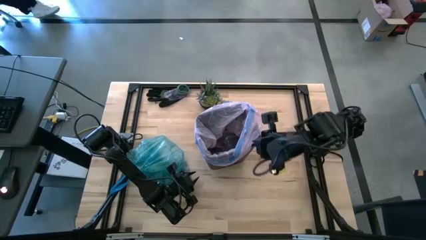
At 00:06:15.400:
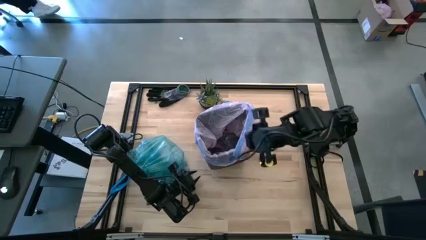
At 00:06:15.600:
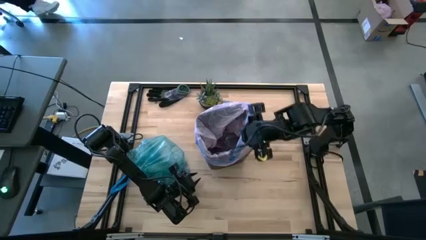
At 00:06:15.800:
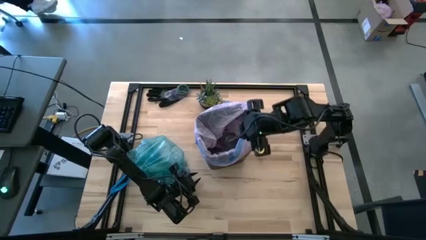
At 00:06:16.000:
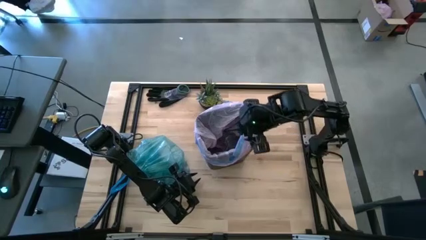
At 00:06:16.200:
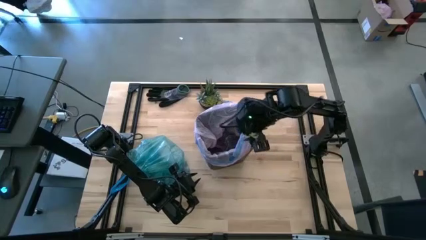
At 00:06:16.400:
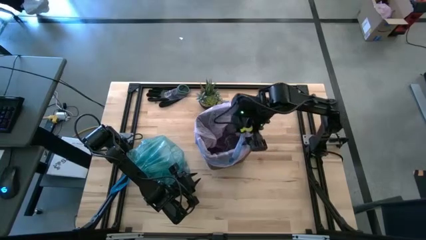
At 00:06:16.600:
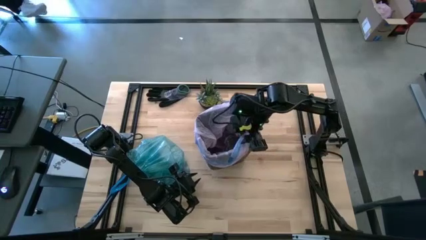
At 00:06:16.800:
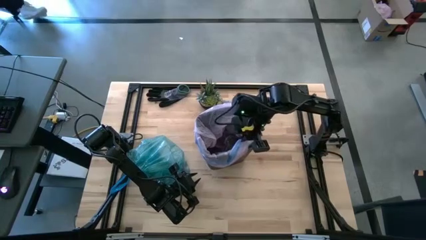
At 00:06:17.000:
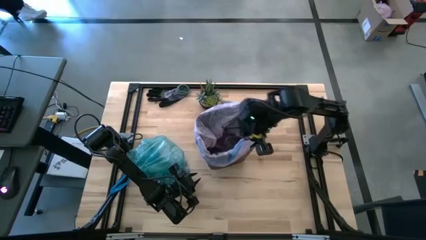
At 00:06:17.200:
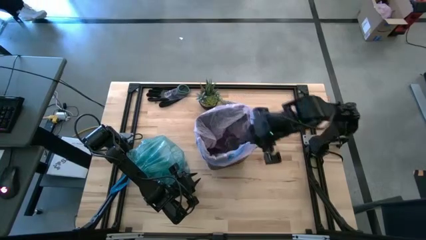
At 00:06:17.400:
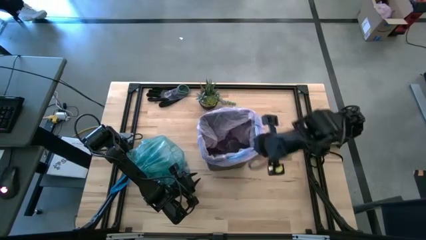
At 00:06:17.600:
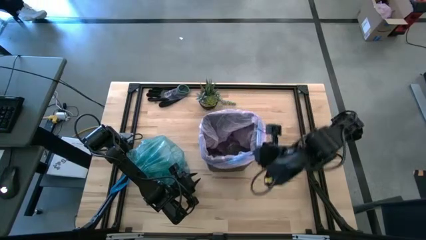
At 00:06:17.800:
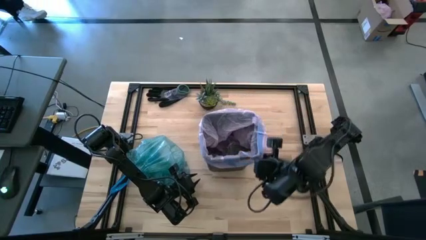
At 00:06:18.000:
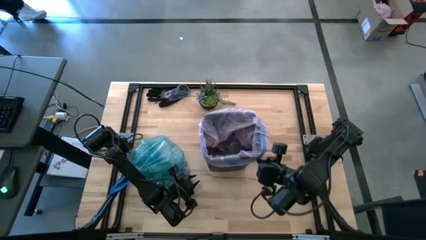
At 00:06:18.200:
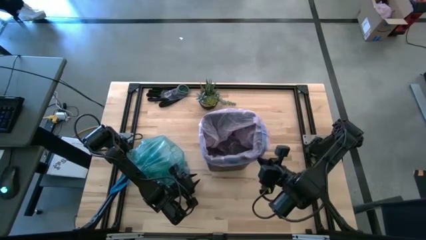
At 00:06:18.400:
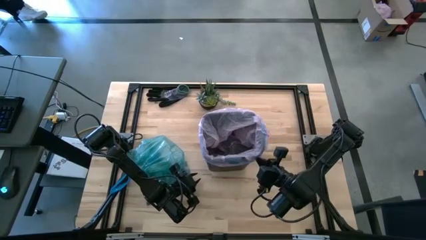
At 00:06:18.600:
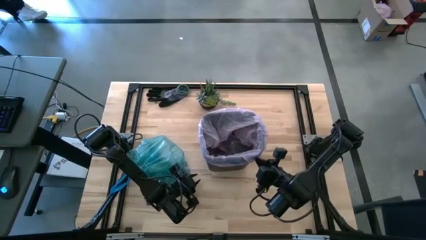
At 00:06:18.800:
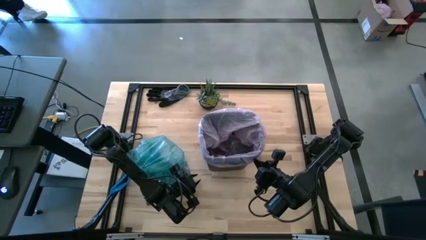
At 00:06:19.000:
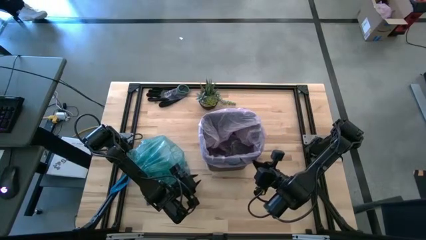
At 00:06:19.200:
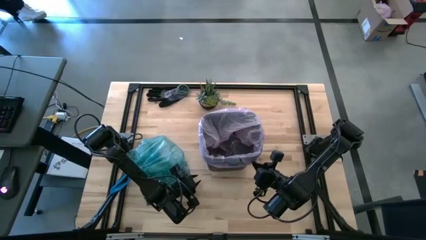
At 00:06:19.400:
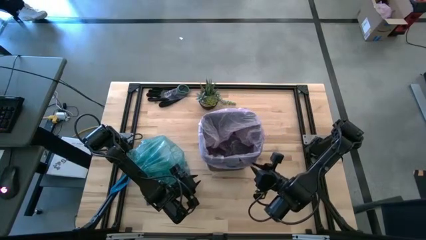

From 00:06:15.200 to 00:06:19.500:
Task: place trash/remove bag and relplace
Put the pink trash bag into the trash bin

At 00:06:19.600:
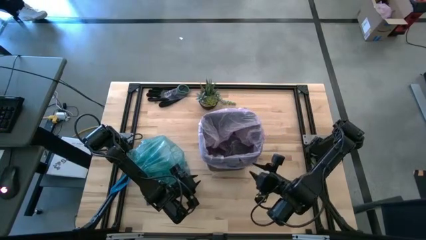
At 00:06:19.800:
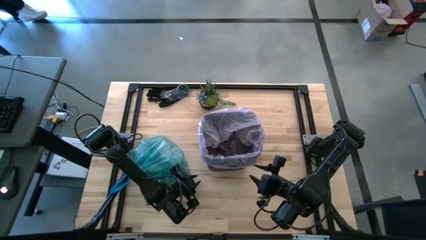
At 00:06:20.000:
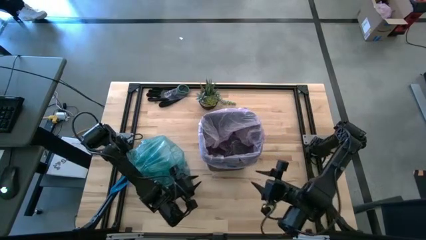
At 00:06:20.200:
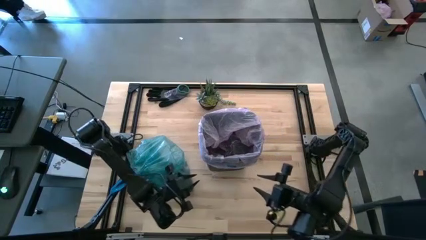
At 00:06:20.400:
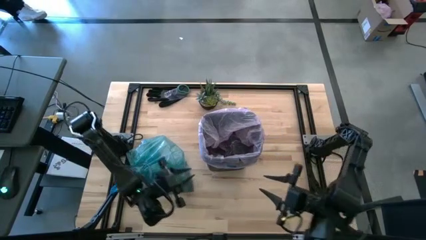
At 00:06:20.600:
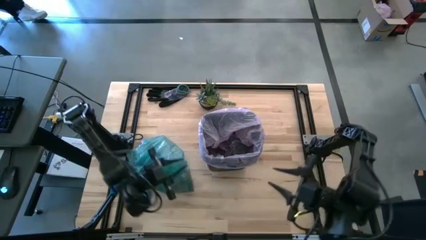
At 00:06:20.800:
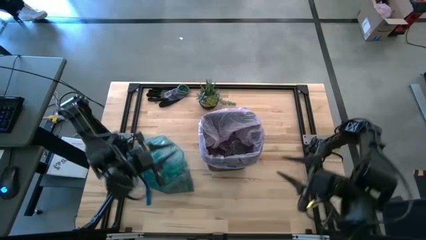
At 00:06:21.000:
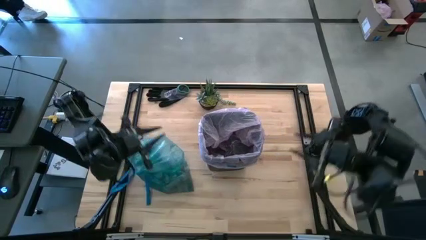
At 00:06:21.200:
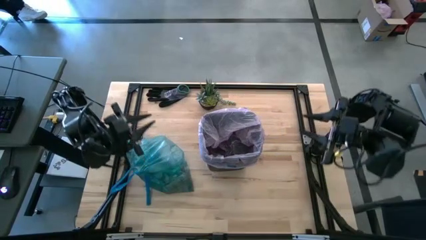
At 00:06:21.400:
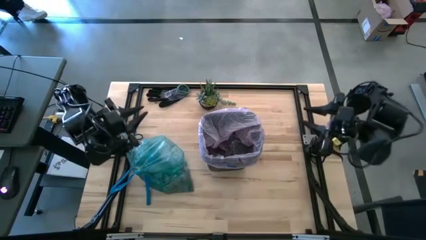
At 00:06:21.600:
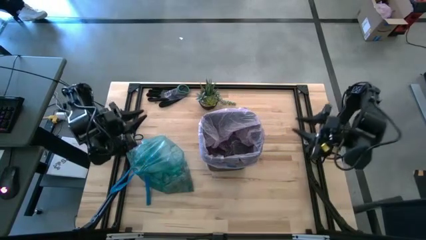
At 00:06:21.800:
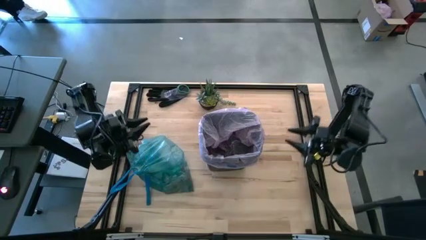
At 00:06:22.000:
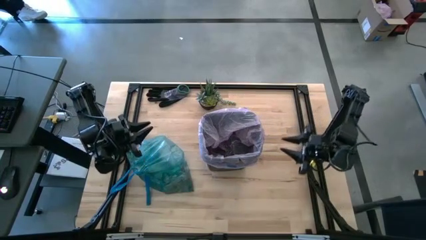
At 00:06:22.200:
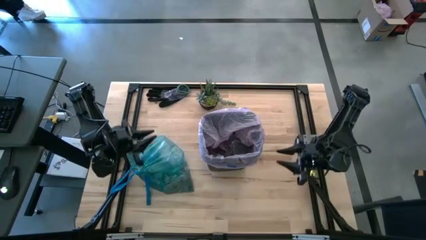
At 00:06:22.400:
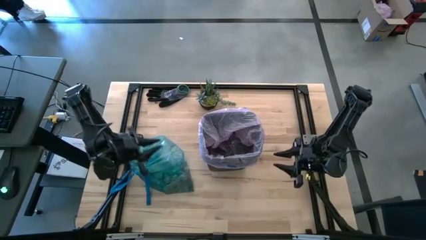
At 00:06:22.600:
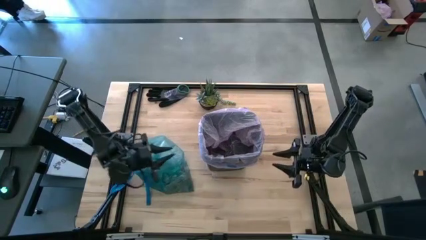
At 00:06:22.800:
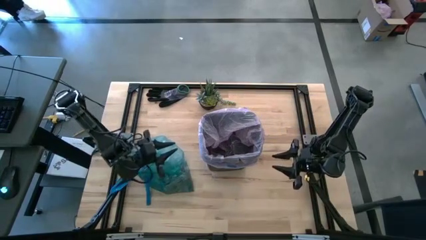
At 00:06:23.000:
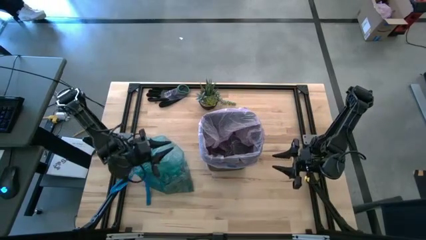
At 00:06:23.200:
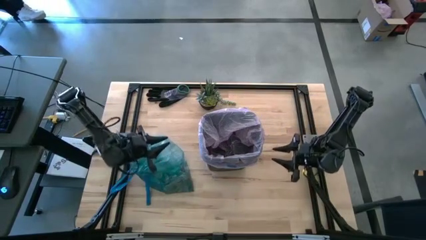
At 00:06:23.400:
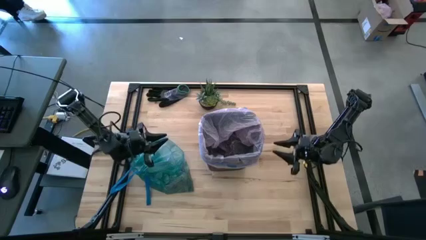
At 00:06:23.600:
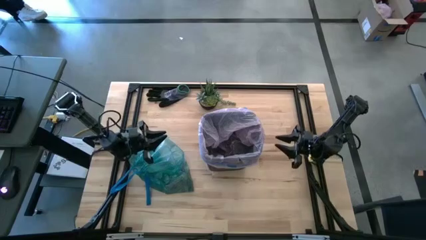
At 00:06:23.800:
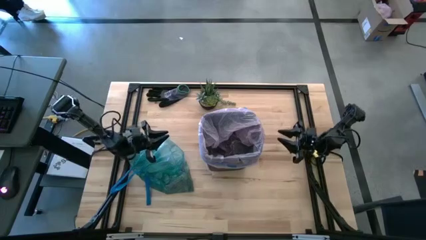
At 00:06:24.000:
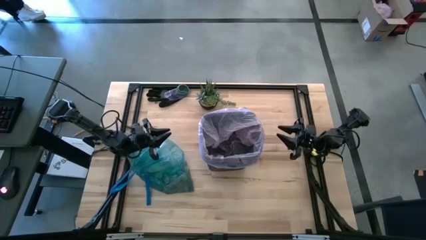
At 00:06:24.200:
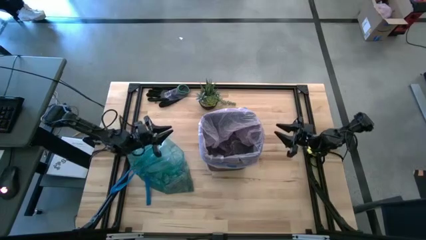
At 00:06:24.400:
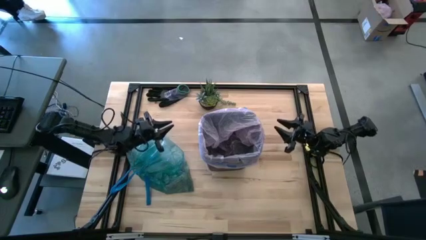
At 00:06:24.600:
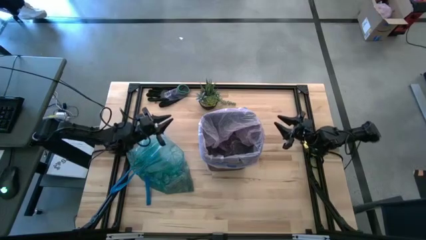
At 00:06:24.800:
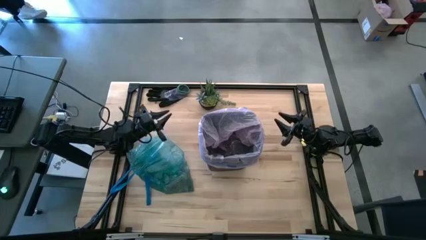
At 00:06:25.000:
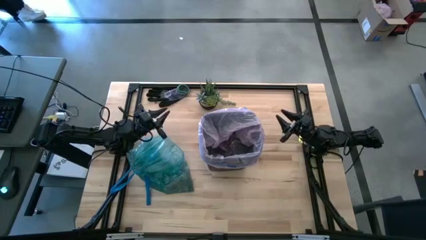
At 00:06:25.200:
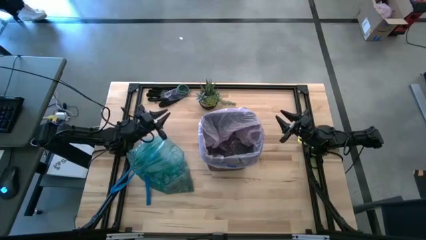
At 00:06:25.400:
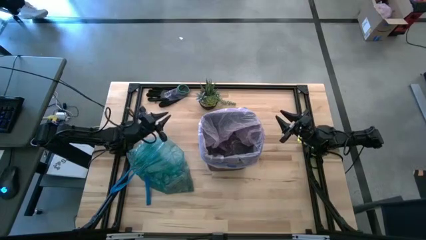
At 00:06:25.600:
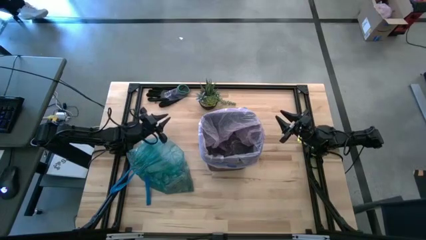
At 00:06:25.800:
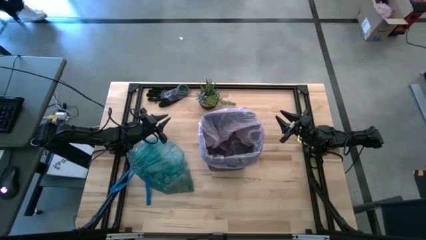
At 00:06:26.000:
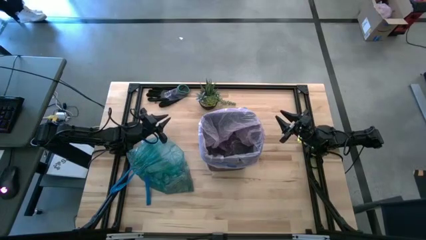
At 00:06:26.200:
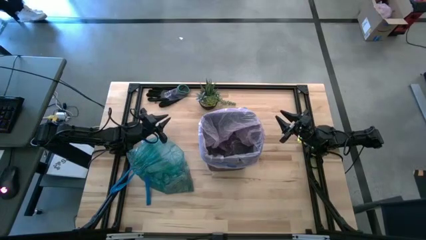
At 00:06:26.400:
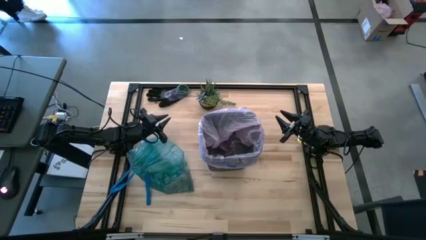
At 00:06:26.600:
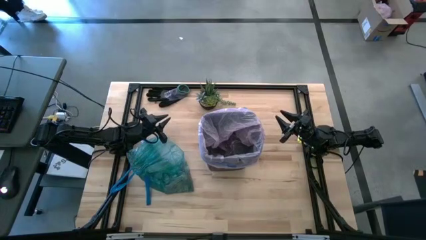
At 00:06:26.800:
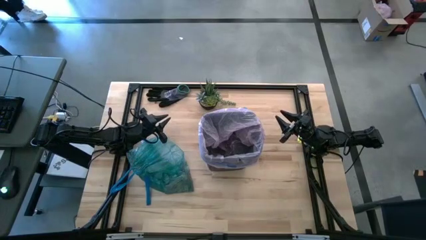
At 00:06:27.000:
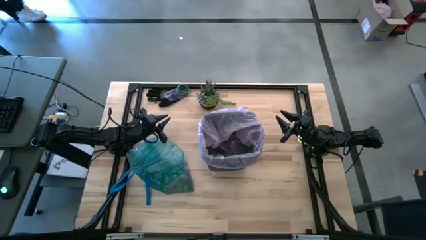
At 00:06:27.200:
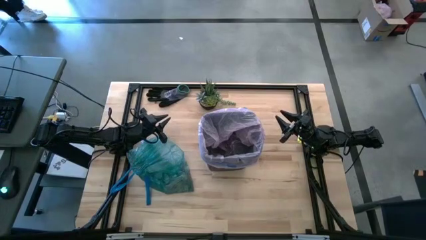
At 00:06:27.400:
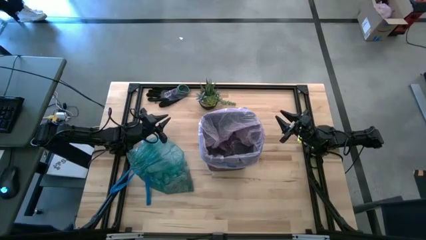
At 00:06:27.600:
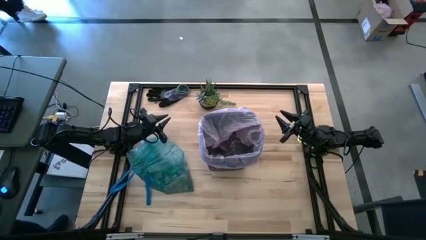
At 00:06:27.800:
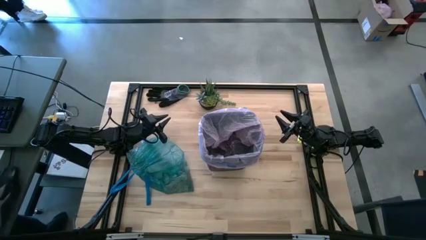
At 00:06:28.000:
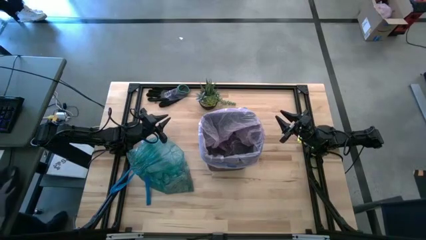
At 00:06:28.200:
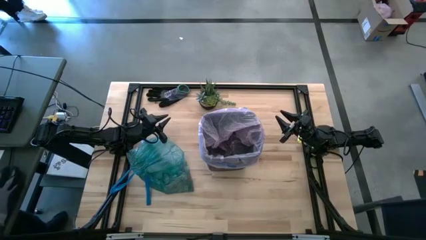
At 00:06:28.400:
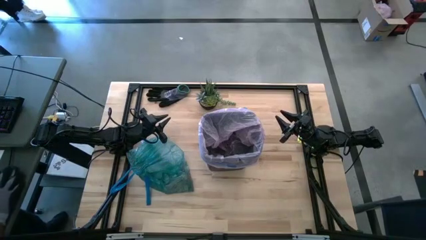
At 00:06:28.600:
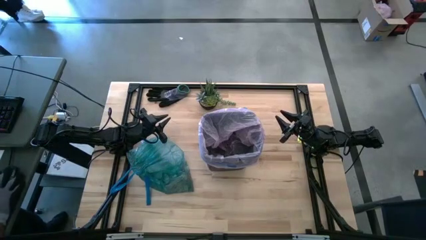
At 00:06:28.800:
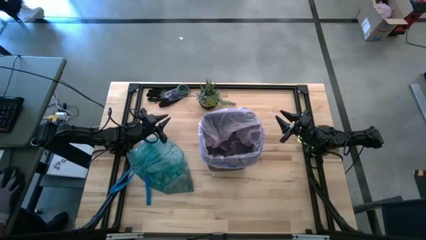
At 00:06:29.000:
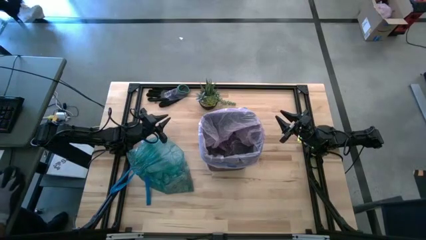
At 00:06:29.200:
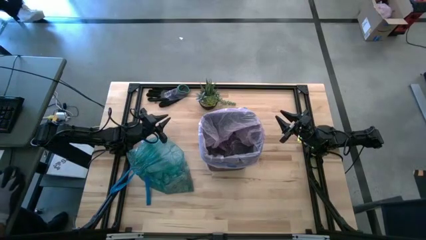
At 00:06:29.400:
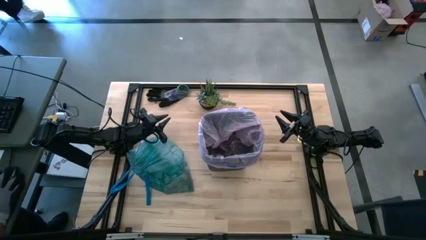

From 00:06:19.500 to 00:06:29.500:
Return to Home Position
